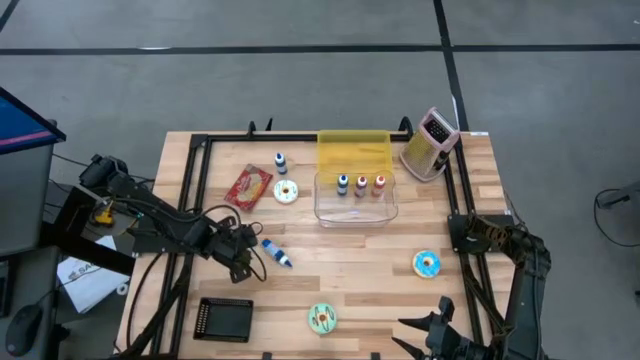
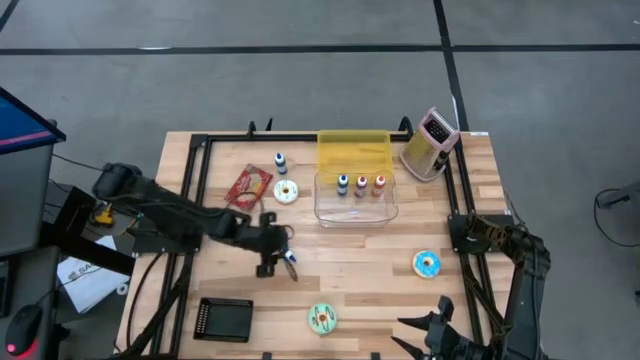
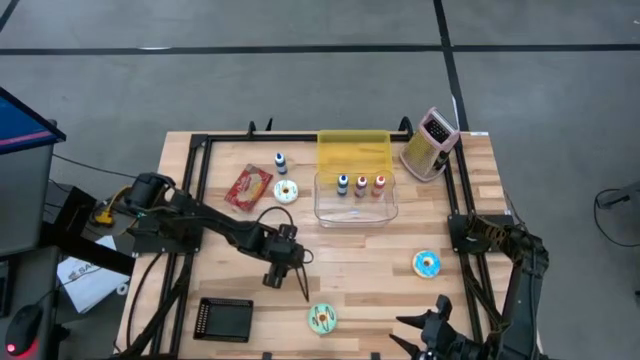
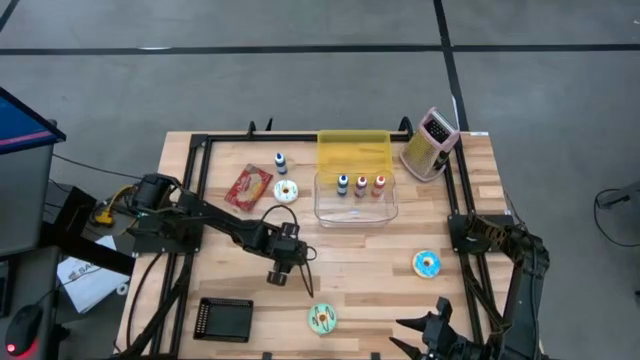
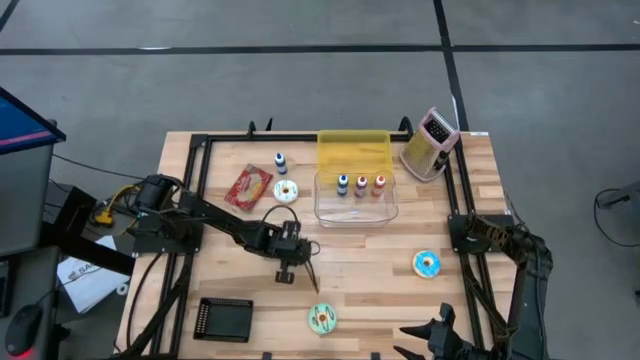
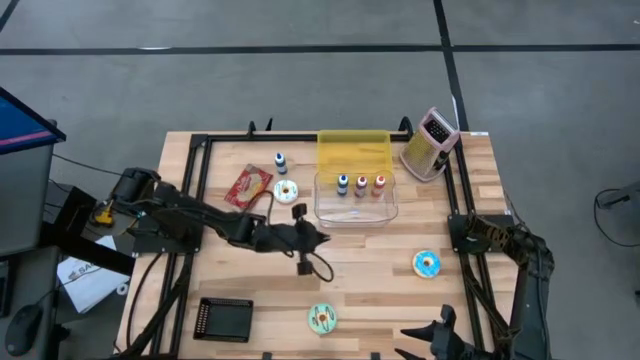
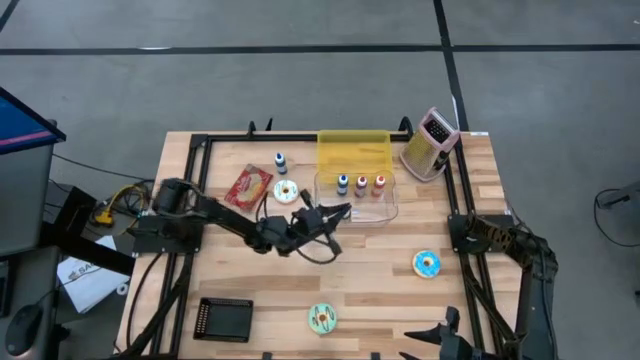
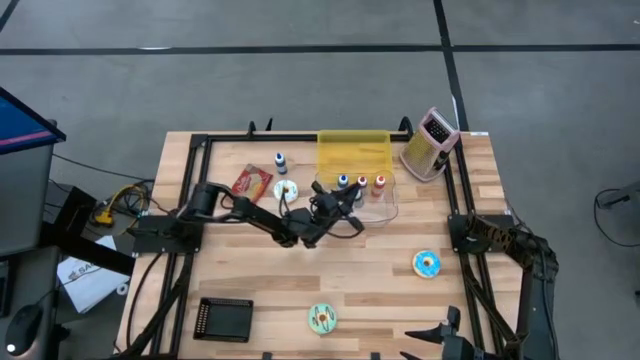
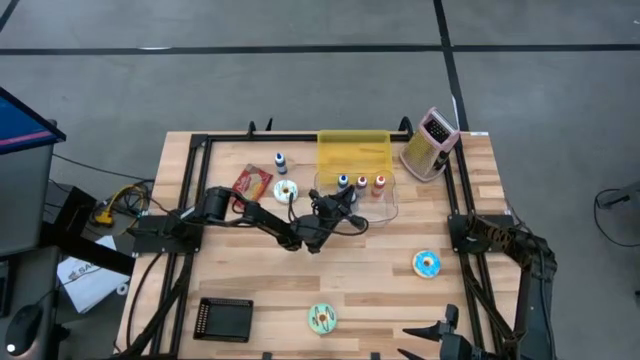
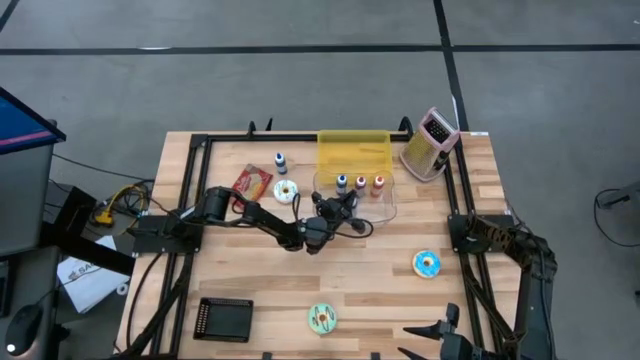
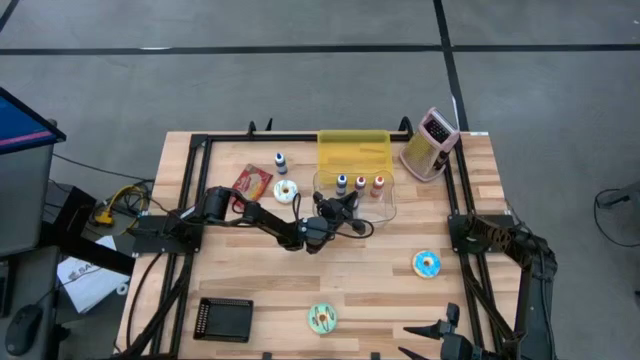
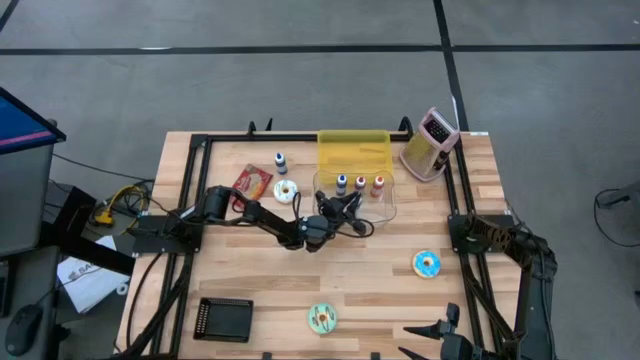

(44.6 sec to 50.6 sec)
Put the bottom blue food coloring bottle into the transparent bin

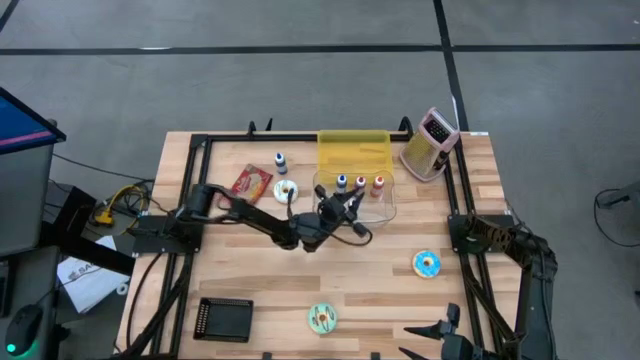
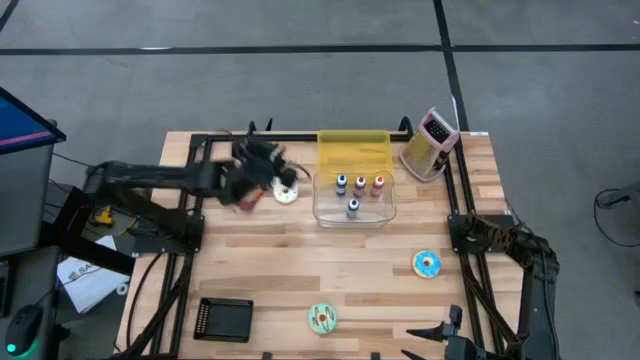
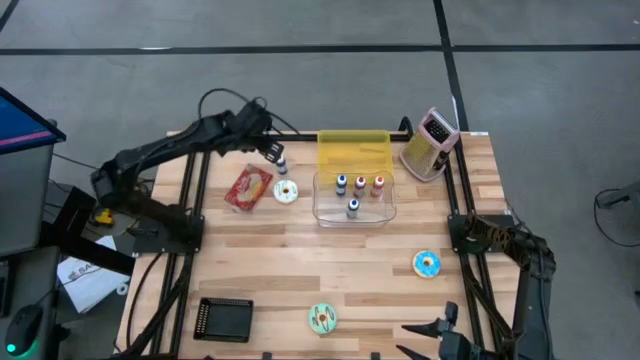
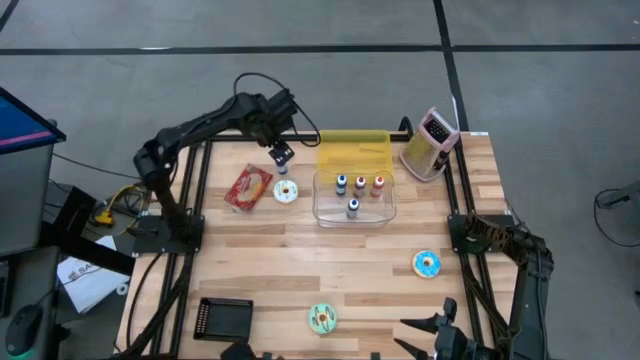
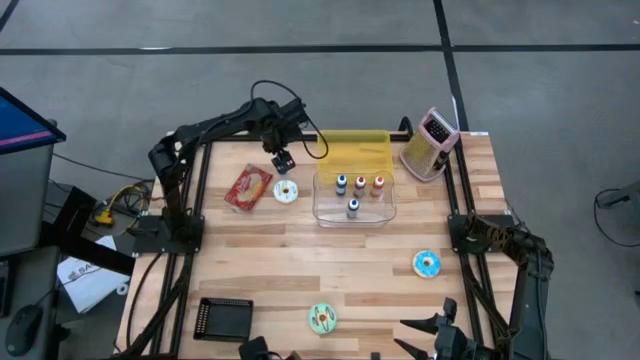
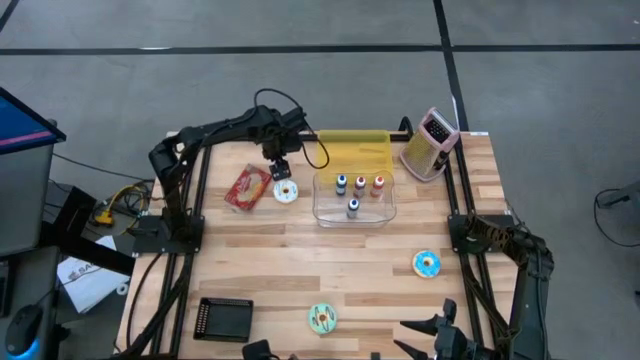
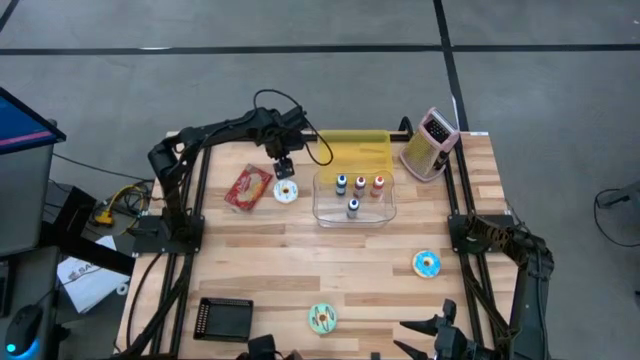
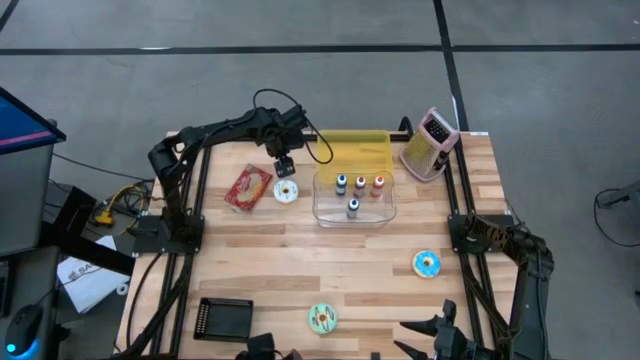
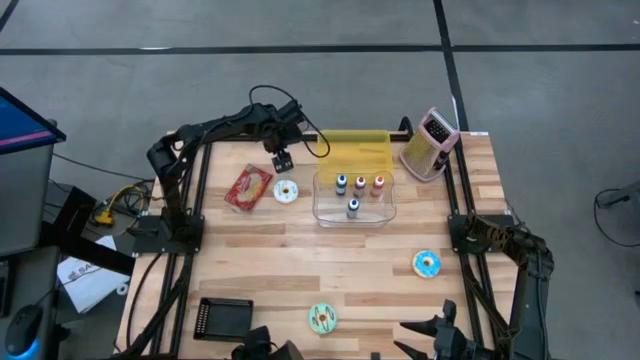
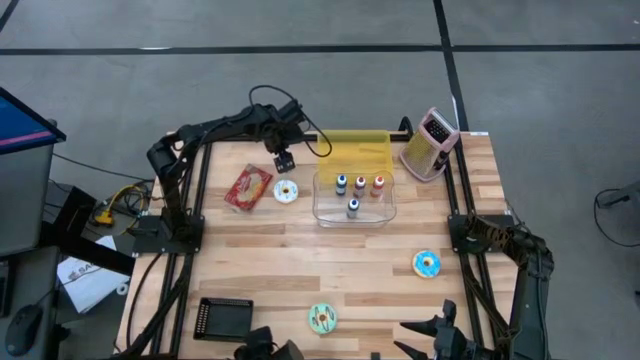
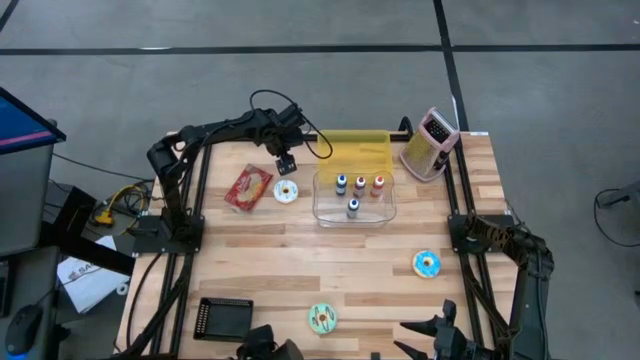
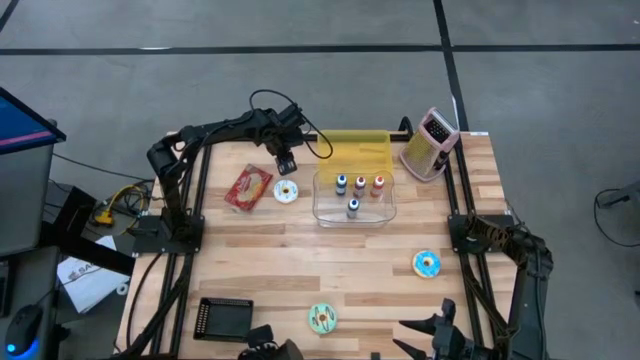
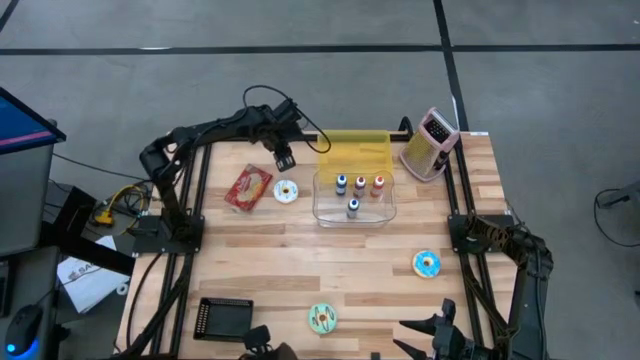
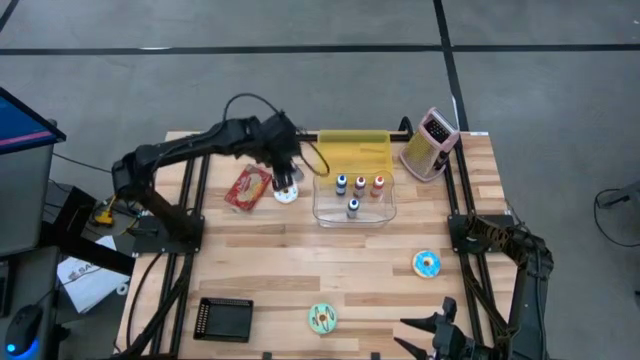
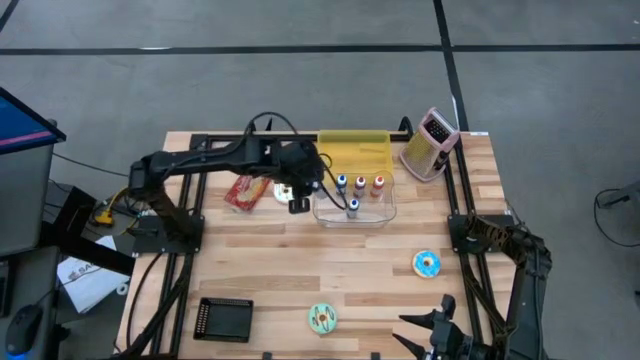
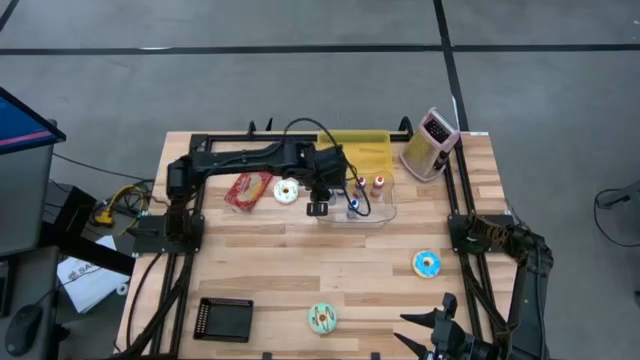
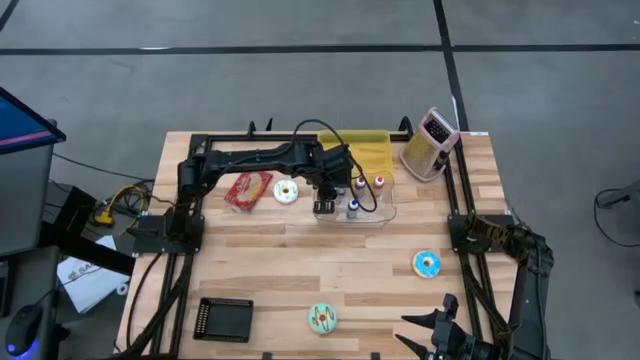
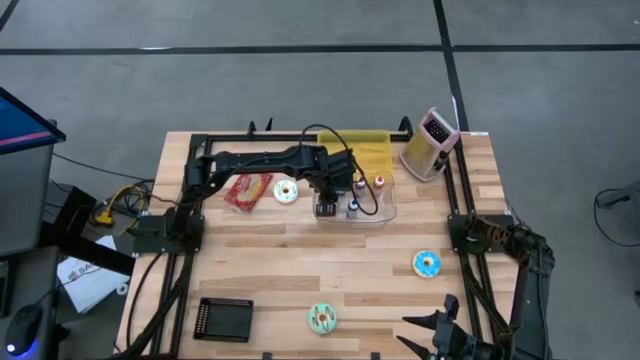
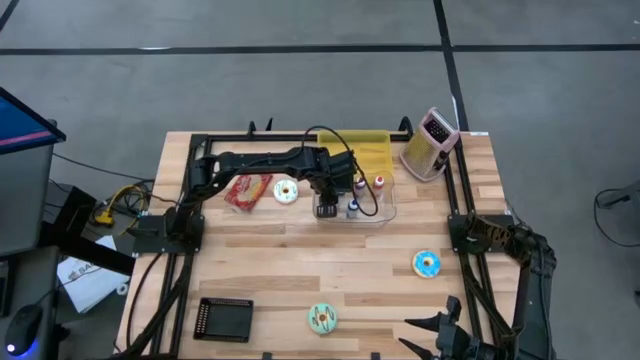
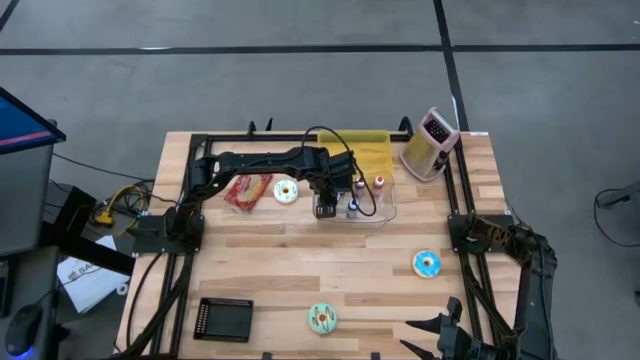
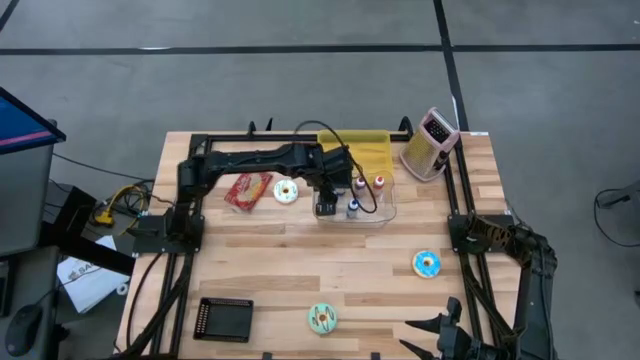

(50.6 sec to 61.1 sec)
Put the blue food coloring bottle into the transparent bin

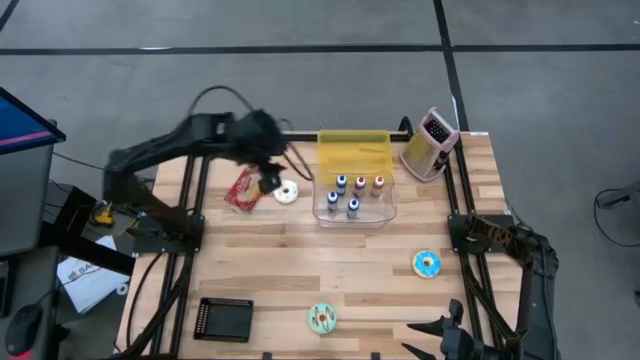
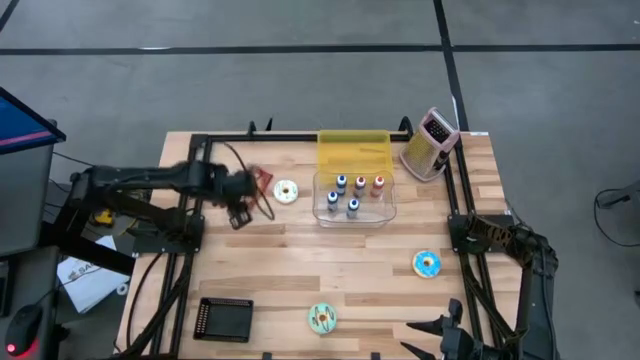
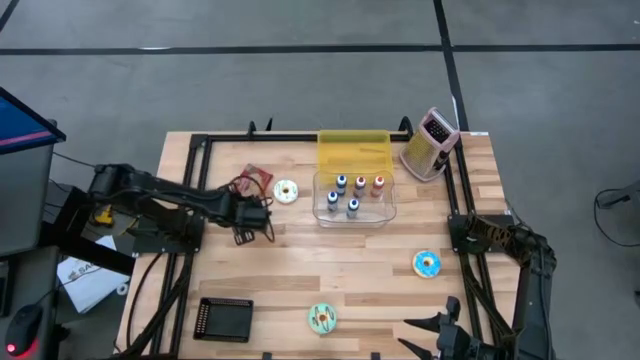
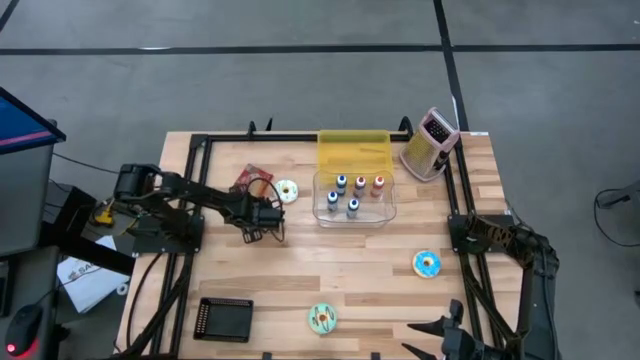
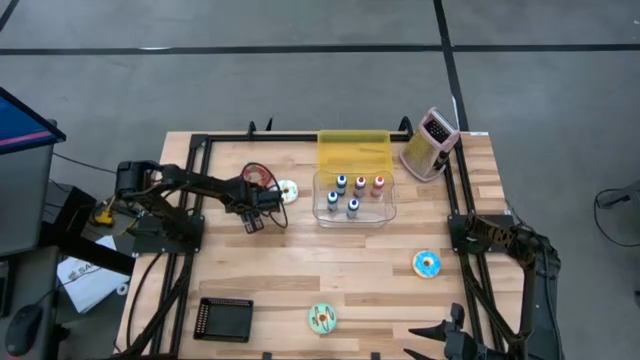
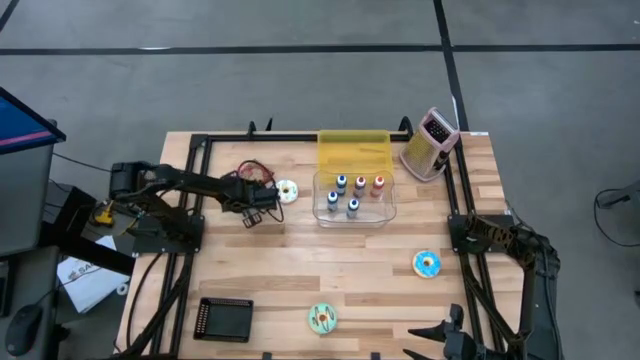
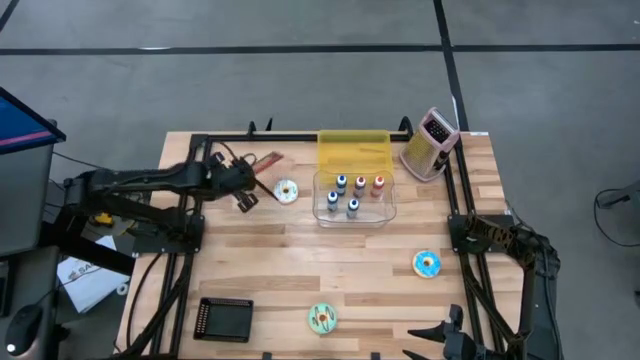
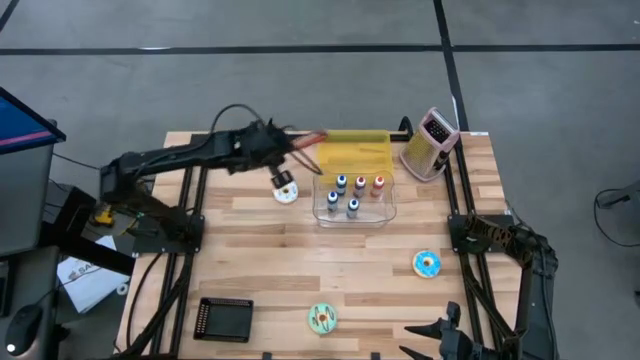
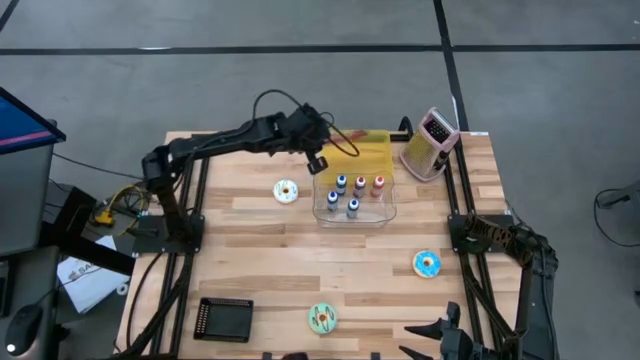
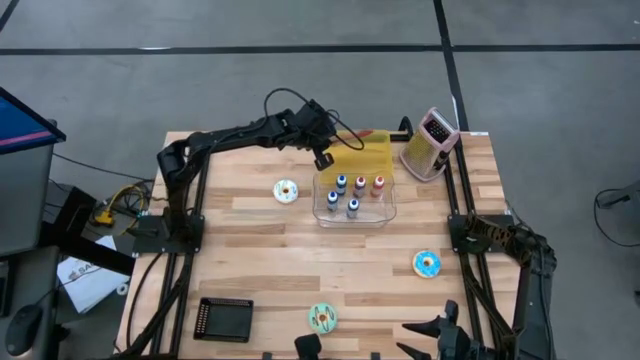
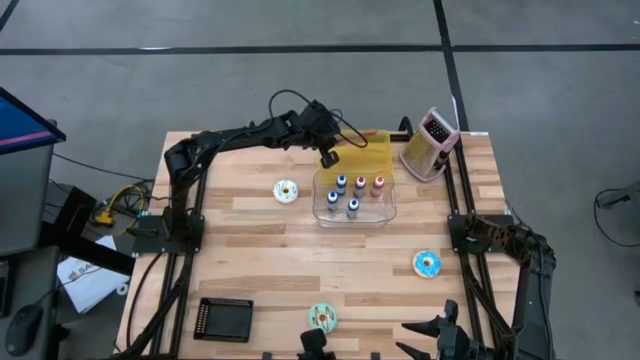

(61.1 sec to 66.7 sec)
Put the red popcorn bag into the yellow bin
